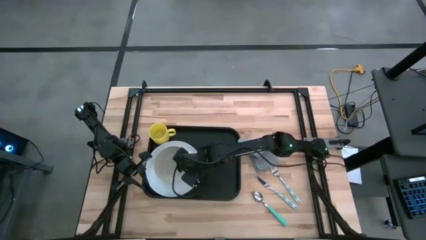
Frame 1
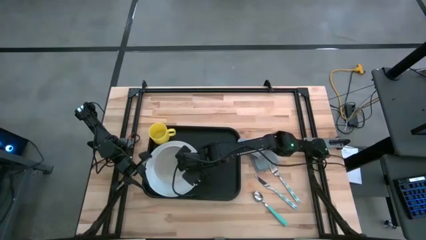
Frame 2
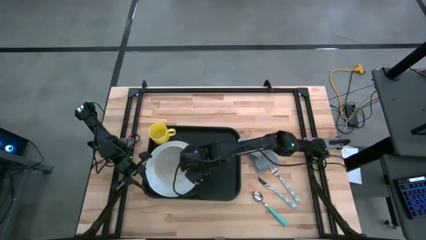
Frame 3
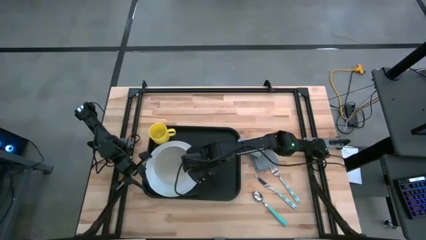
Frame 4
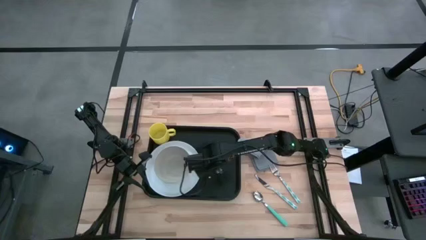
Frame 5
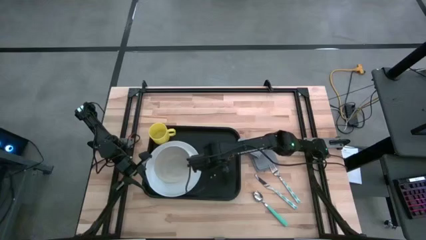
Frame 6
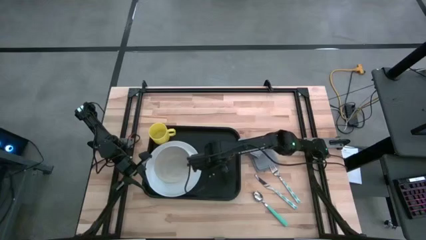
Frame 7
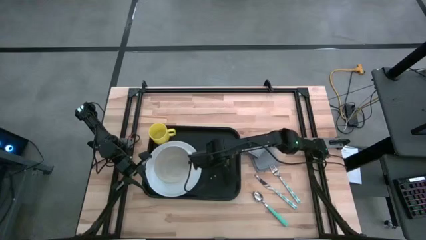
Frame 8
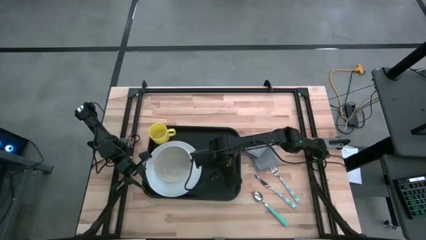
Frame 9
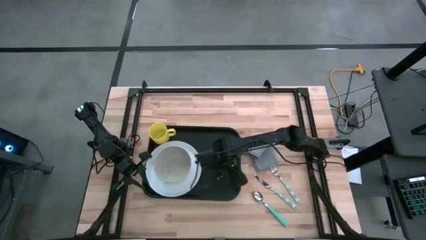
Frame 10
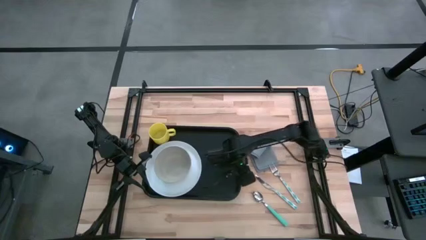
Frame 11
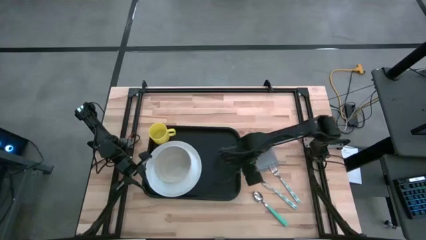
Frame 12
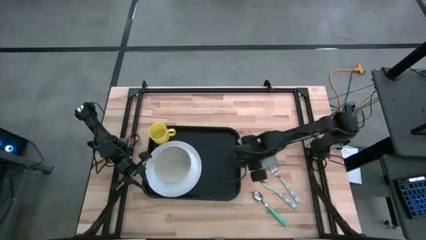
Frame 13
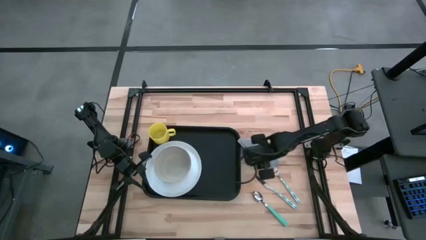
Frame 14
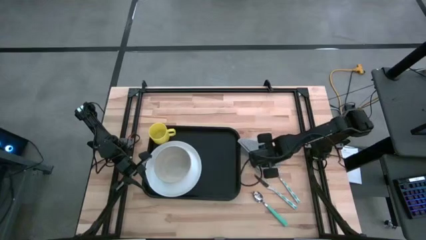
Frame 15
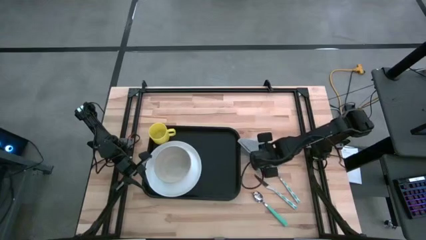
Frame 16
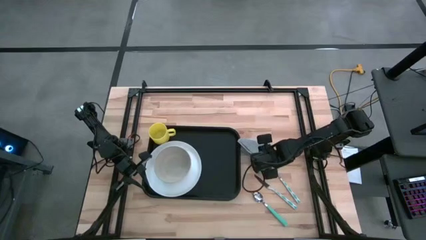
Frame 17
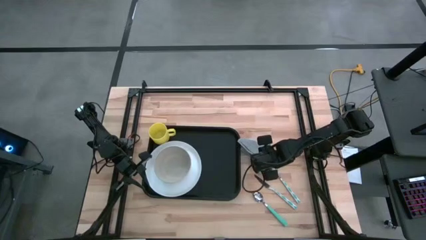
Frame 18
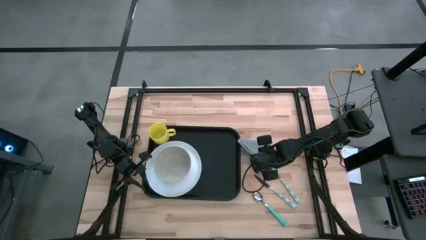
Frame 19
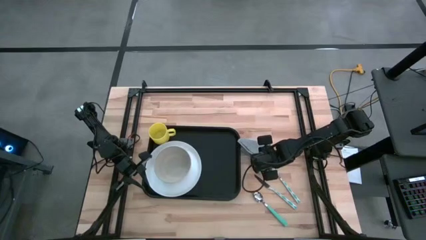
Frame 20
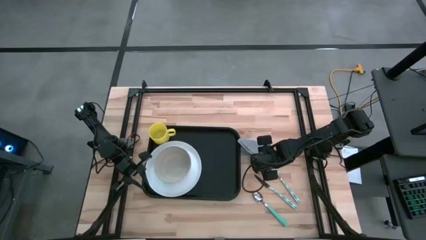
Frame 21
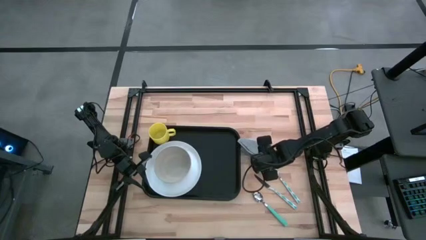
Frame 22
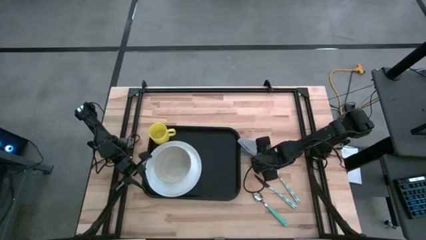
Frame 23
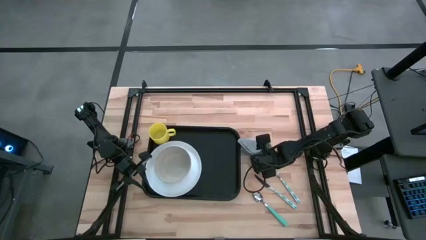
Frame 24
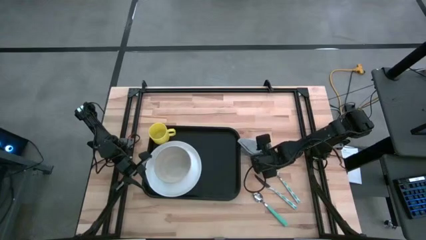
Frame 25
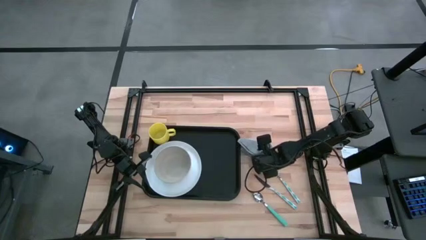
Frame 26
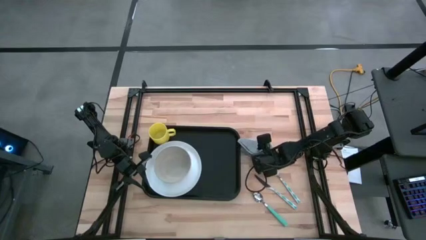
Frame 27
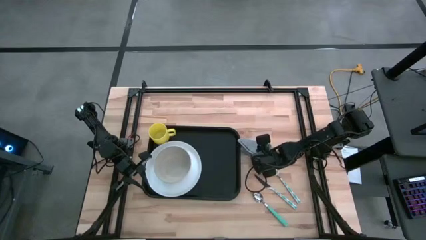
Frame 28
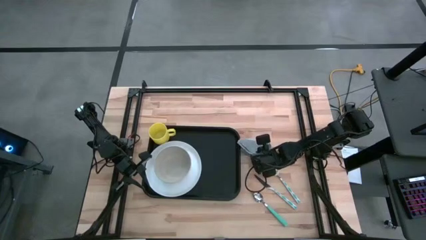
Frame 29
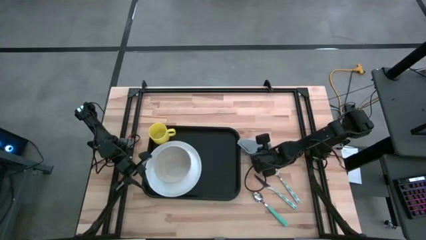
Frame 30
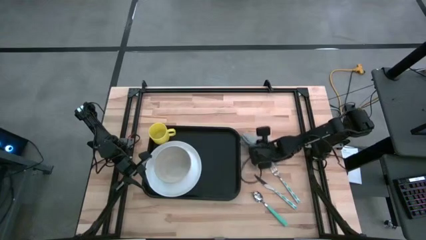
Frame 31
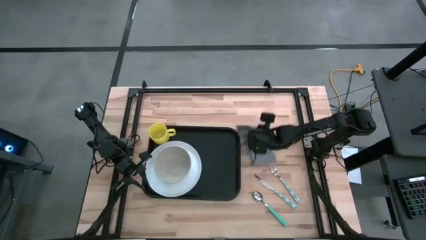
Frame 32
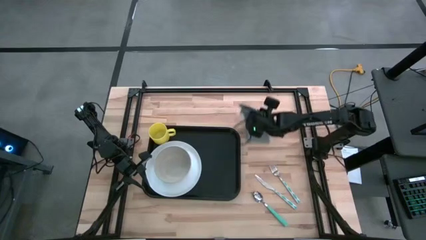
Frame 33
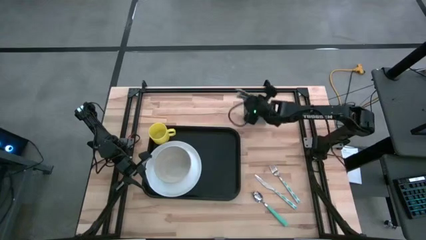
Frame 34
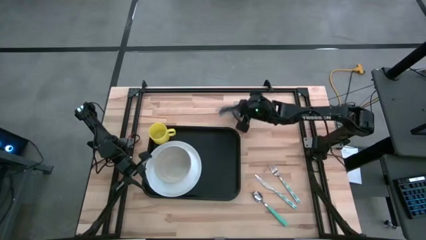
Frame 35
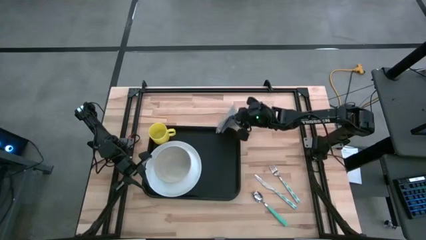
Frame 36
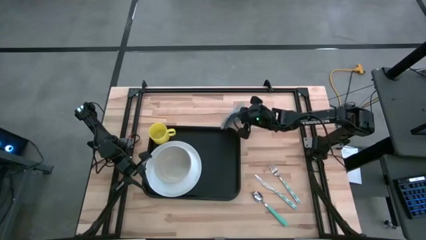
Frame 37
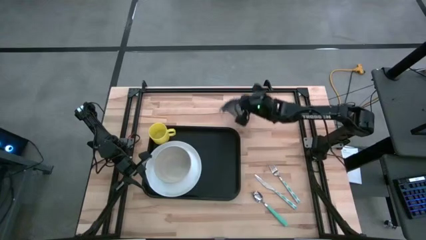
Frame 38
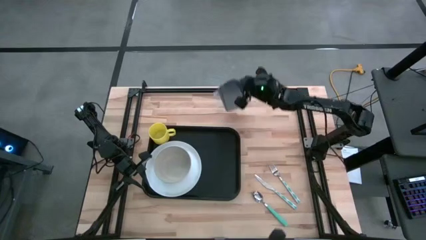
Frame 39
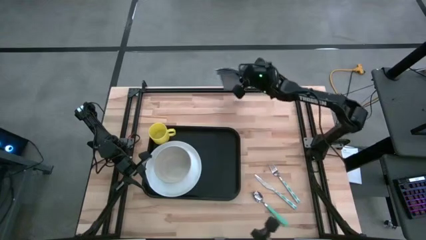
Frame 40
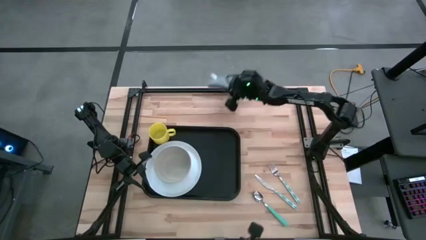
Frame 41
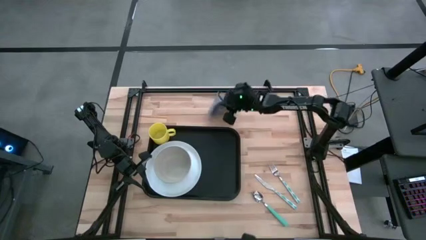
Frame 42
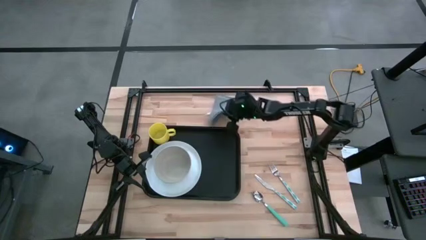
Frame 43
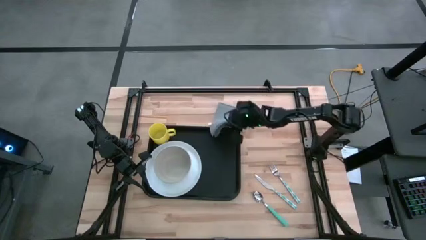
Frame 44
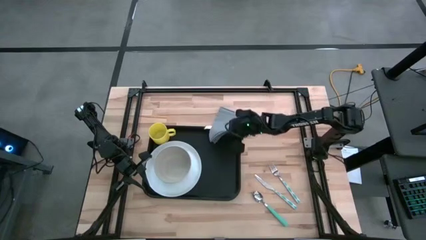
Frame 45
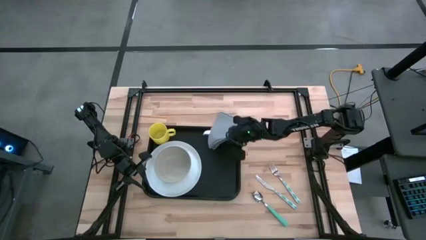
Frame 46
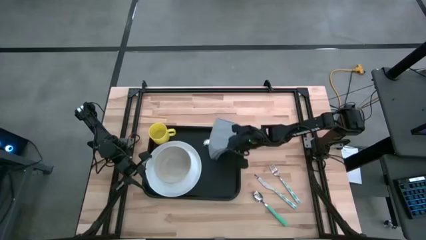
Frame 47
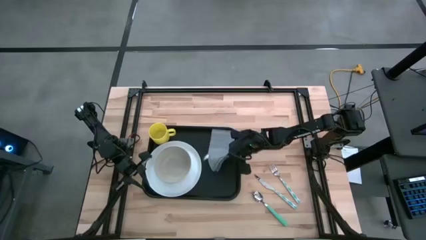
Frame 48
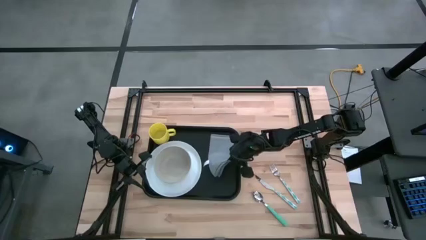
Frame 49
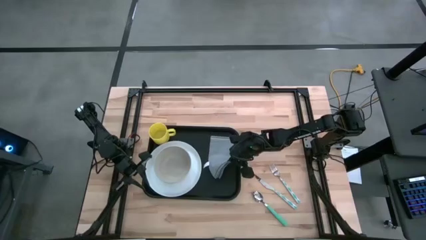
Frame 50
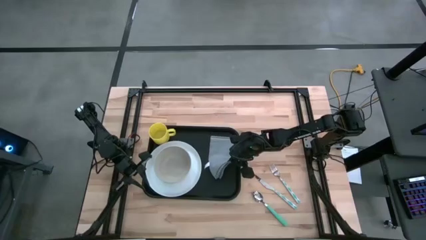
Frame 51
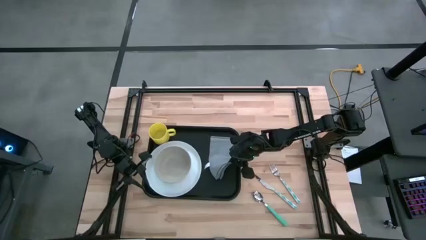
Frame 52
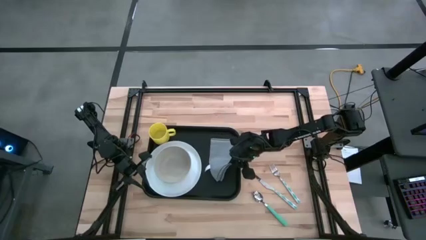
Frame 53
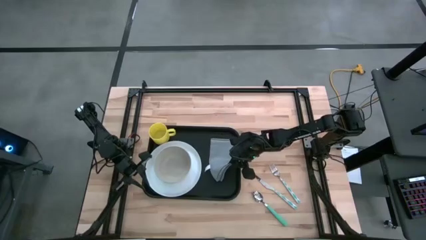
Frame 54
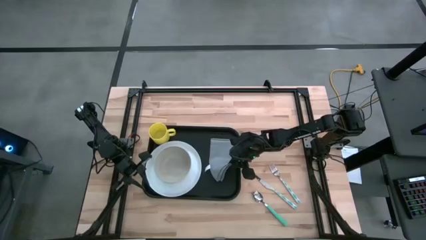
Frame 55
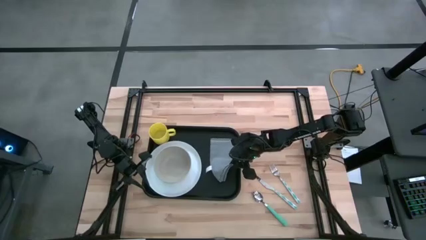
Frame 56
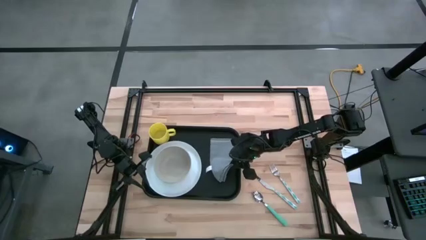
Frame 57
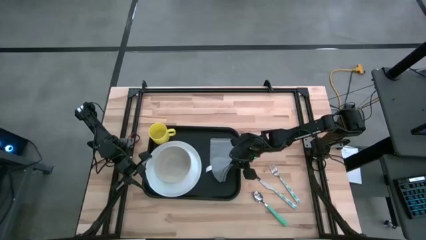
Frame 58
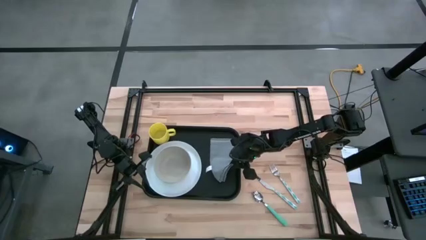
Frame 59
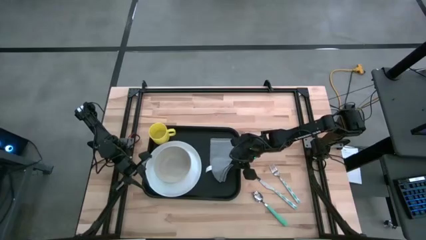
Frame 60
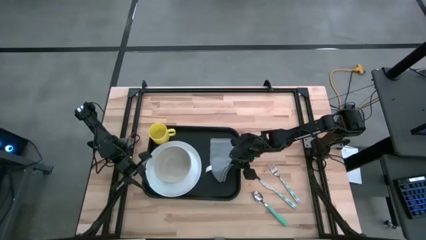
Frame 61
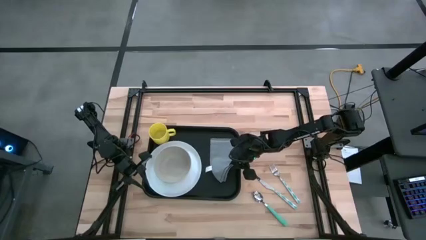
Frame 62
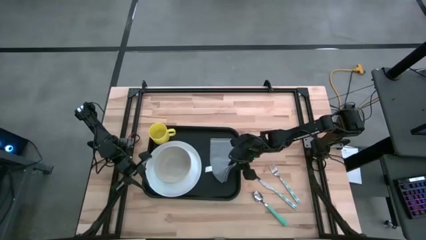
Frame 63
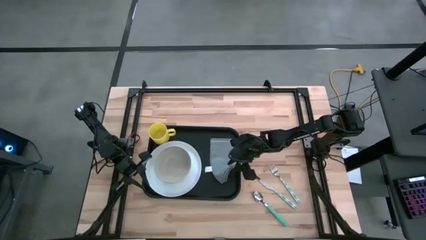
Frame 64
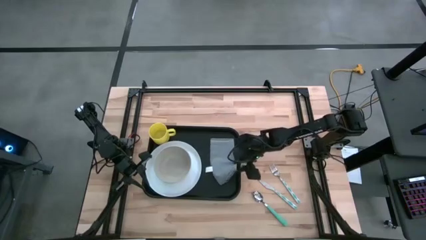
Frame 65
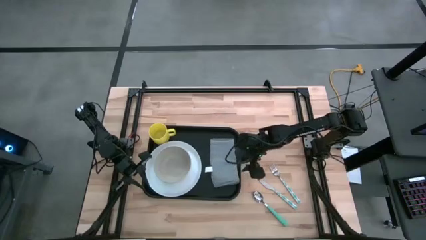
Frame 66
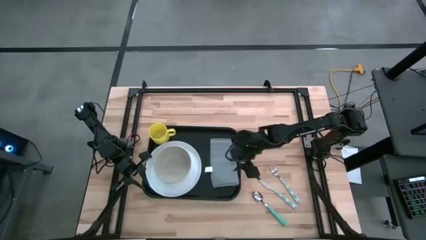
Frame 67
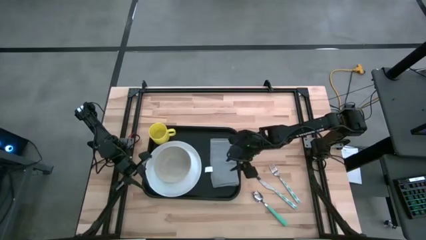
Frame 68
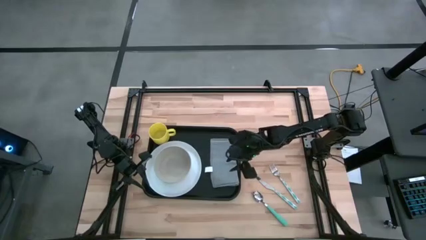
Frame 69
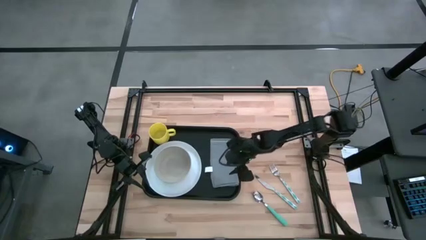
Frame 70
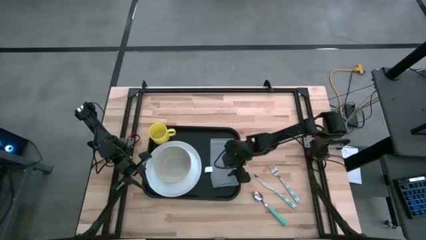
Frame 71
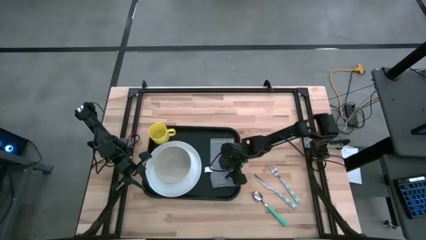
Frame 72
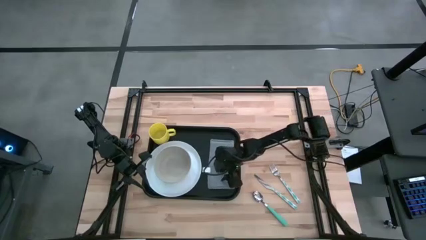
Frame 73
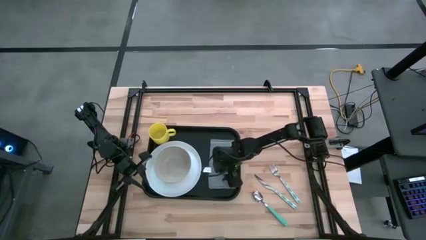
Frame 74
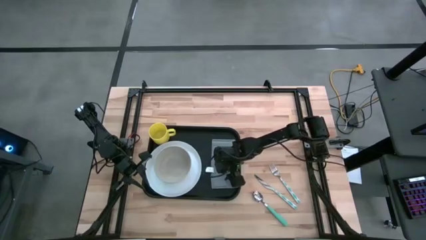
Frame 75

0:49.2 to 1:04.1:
Task: Set up tray
Put the gray napkin on the black serving tray to the right of the white plate

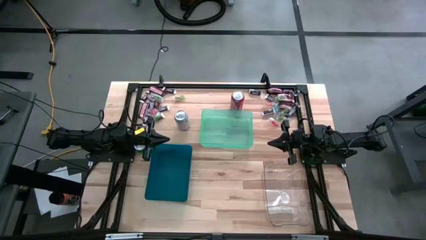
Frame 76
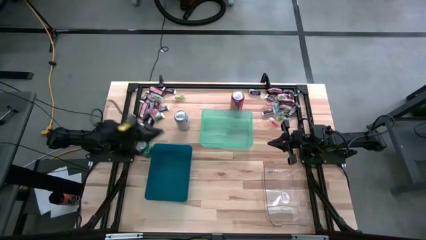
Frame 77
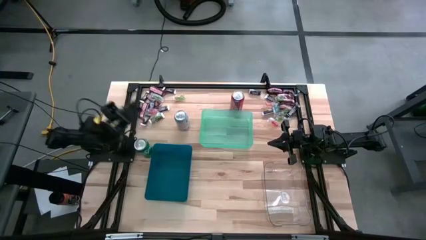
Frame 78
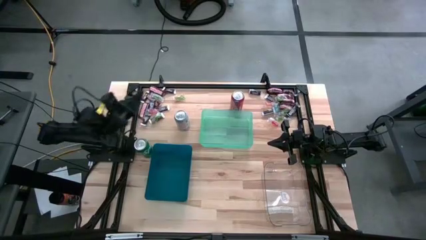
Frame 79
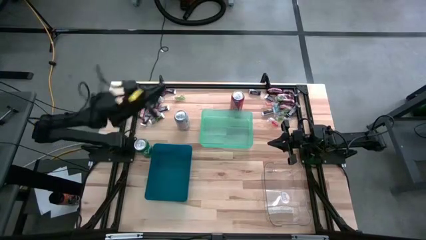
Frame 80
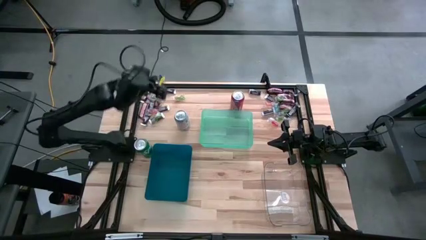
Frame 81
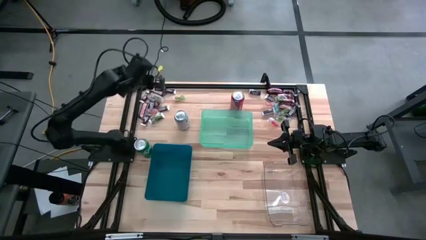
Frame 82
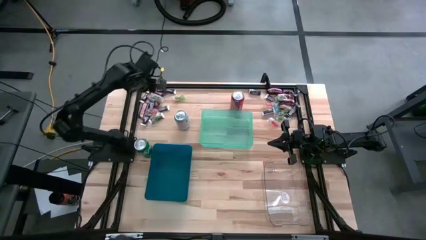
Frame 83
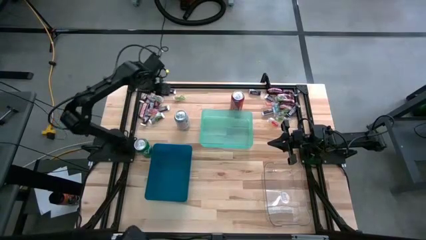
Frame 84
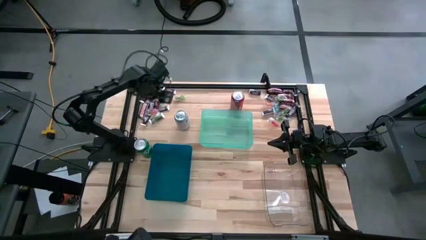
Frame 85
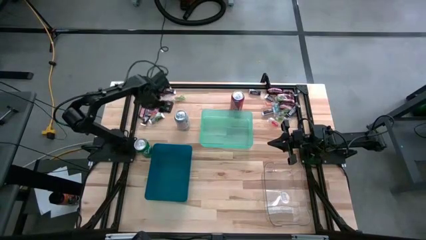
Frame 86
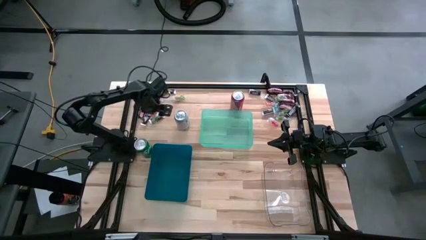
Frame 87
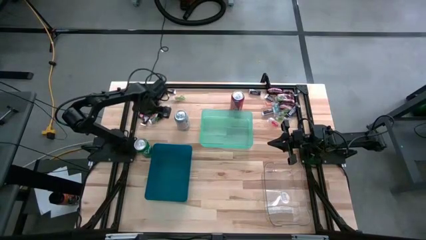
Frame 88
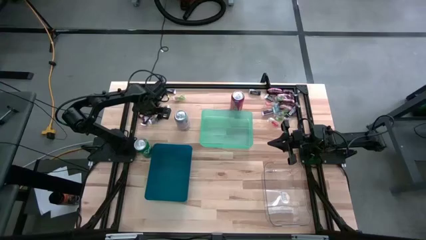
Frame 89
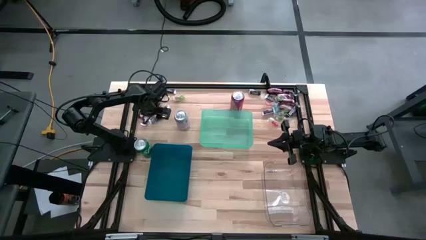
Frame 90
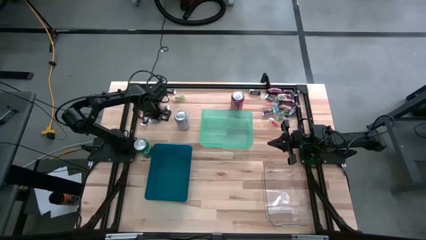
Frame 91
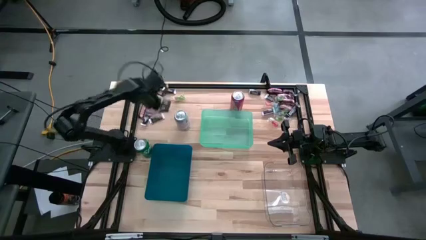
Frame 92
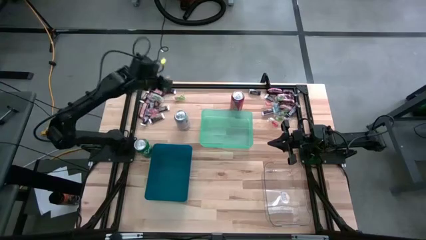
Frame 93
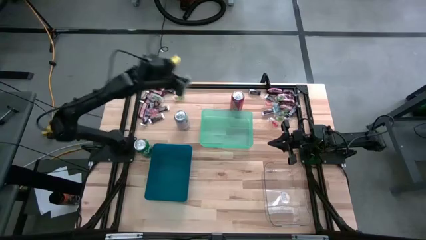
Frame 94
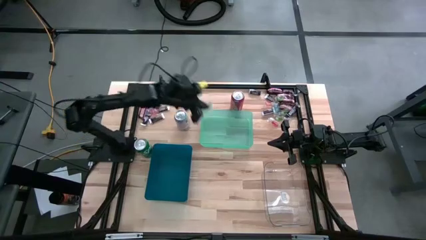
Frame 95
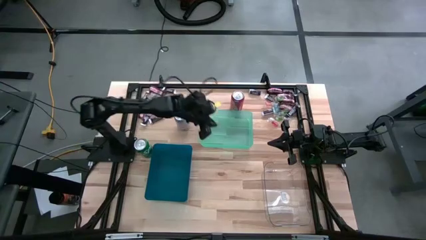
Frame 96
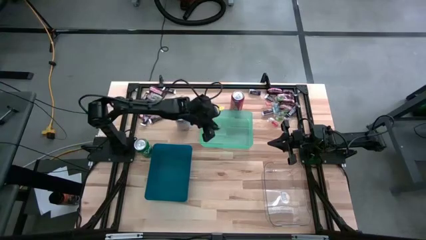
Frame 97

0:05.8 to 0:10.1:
Task: Organize candy in baskets
Put the green gummy into the green bin
